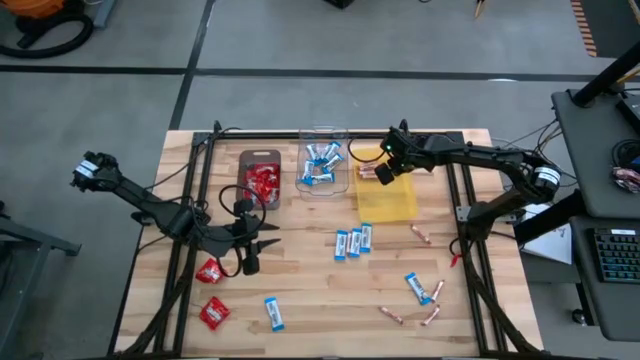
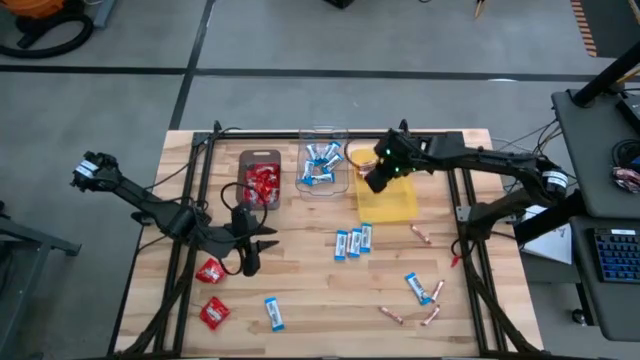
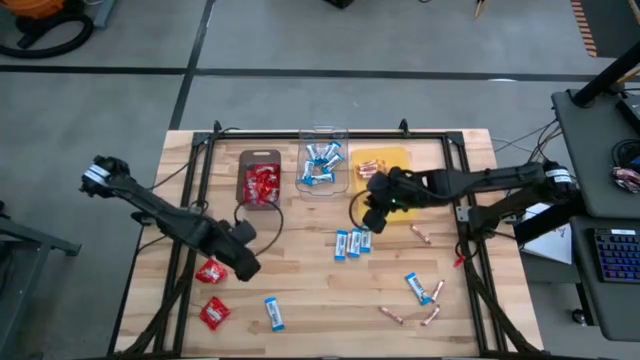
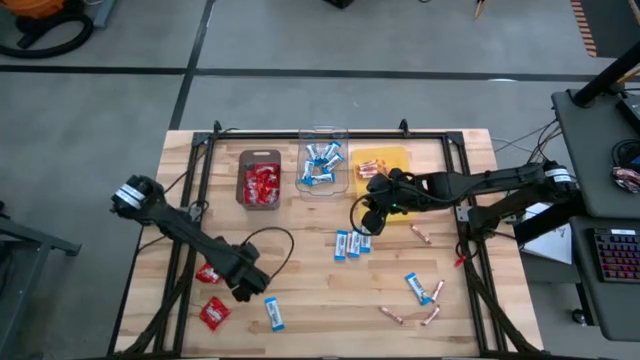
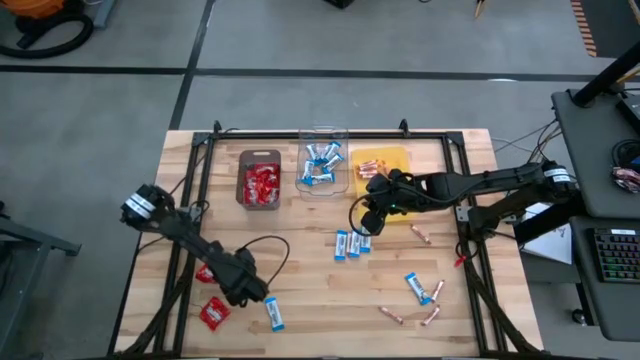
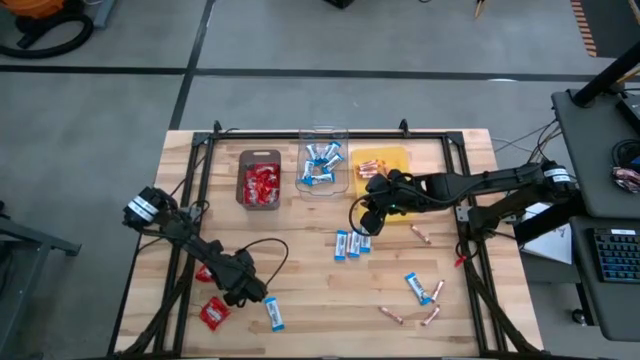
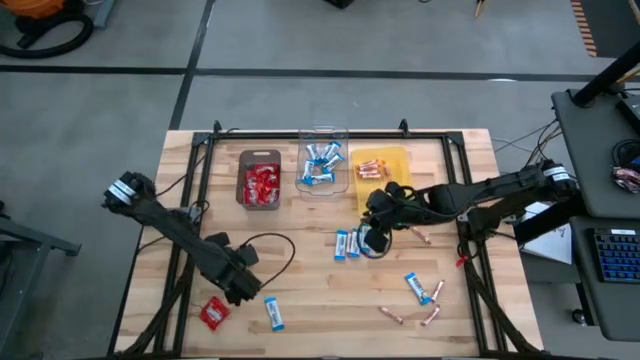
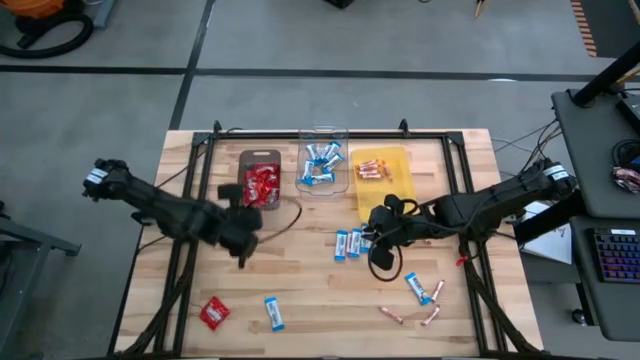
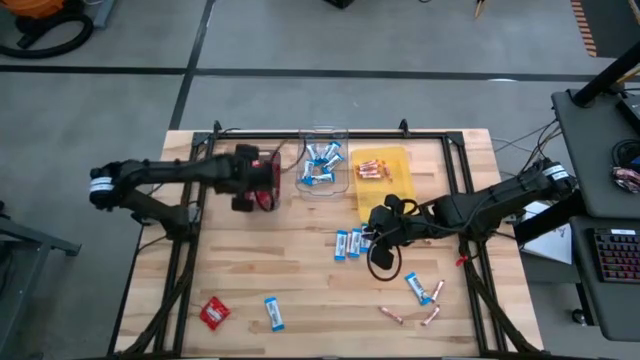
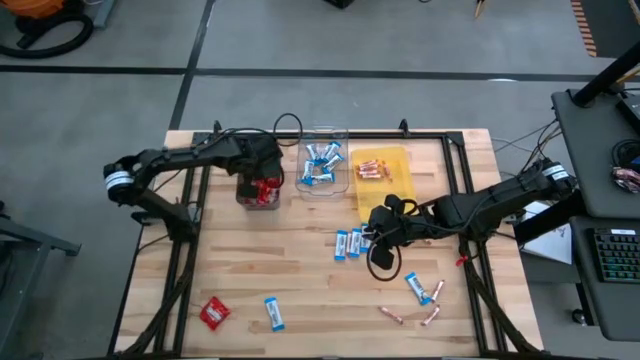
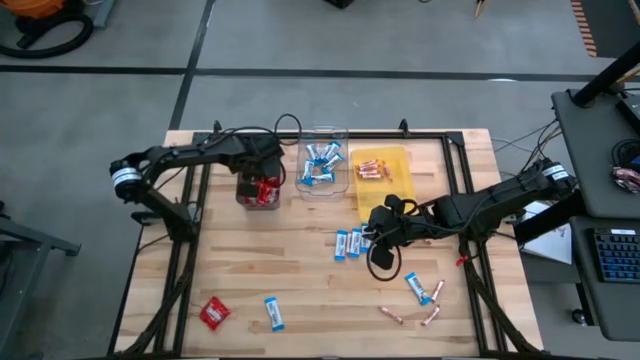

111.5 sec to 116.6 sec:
Task: Sort candy
Put the red candy into the black bin

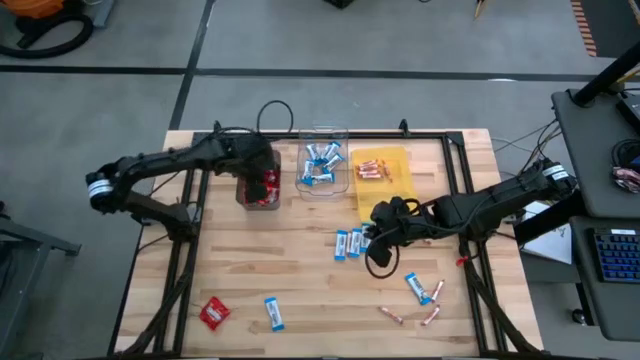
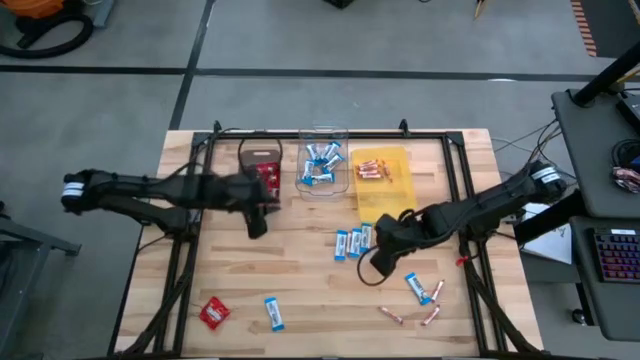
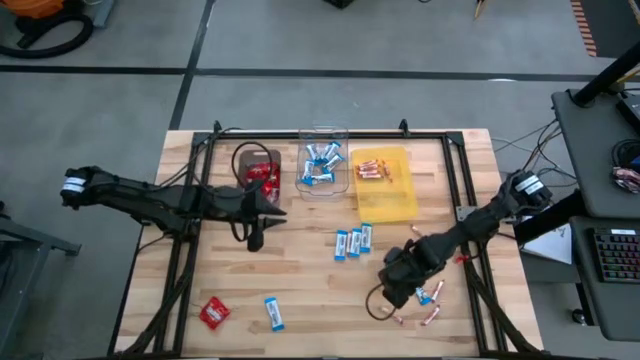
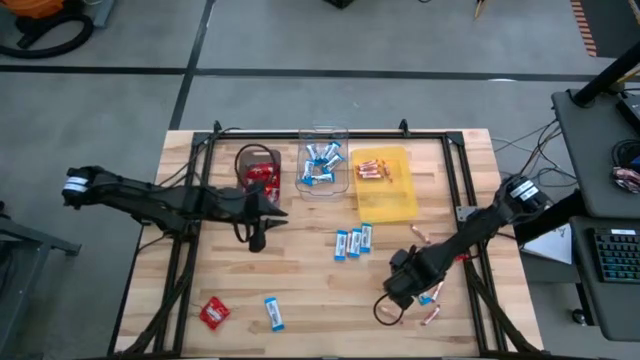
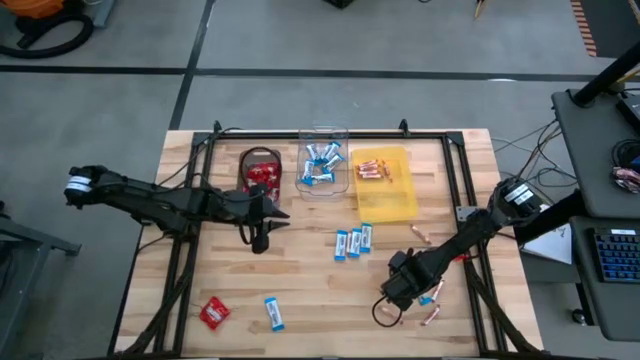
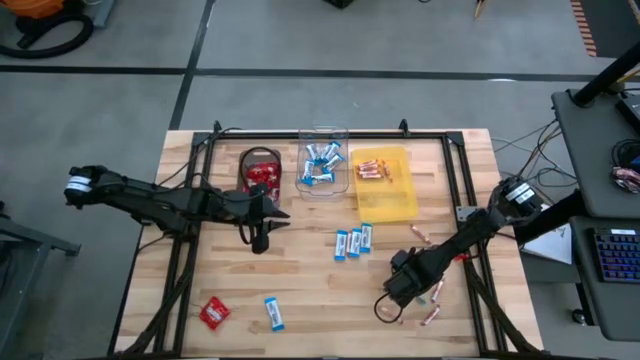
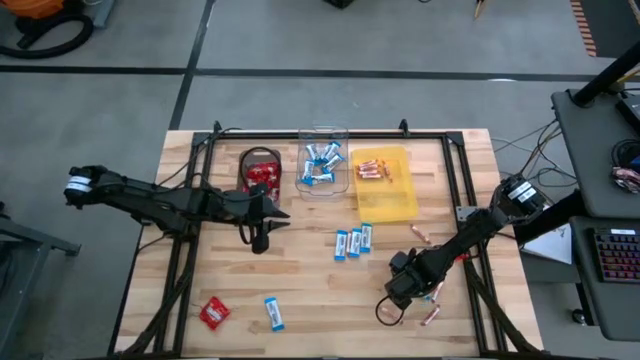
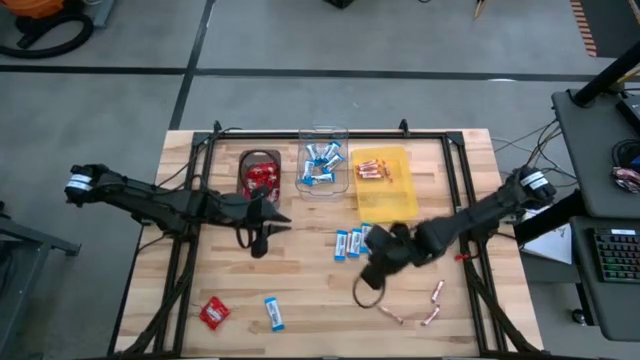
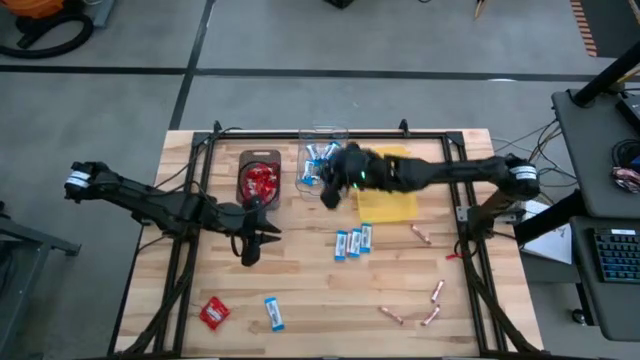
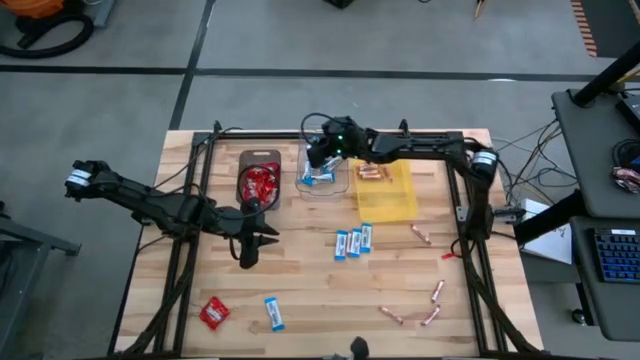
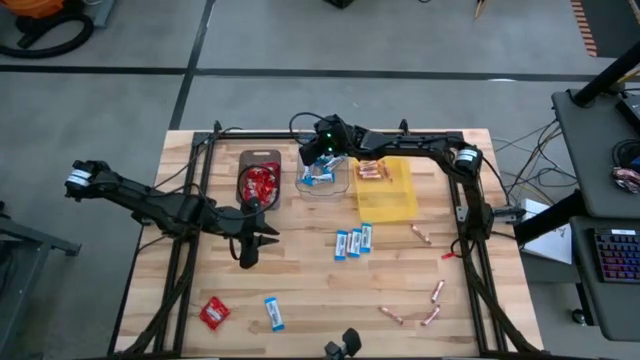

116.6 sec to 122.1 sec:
Put the white chocolate into the transparent bin

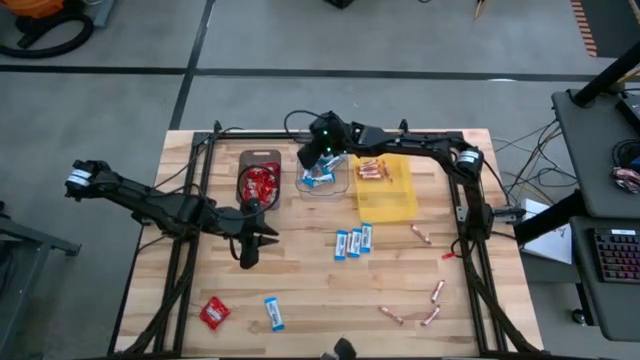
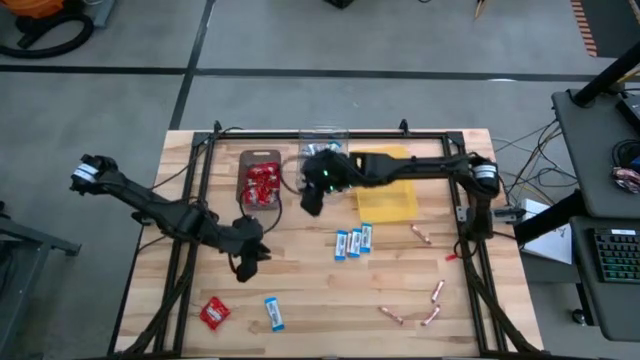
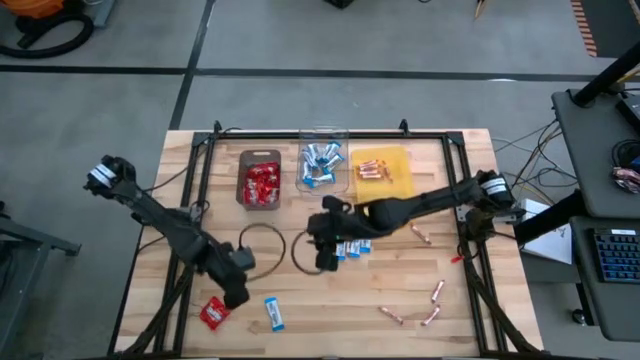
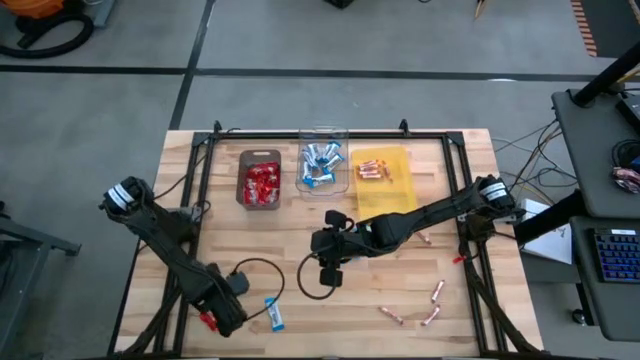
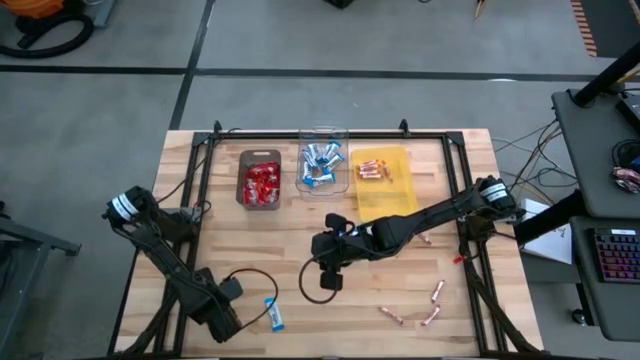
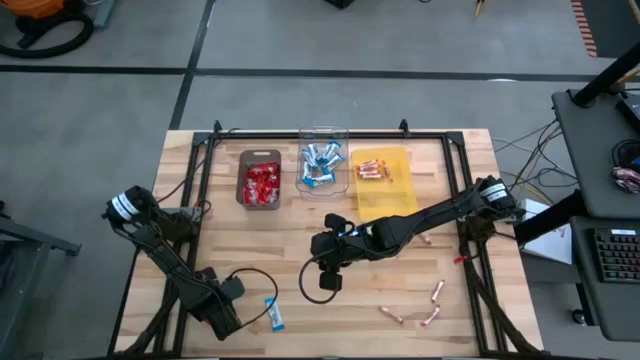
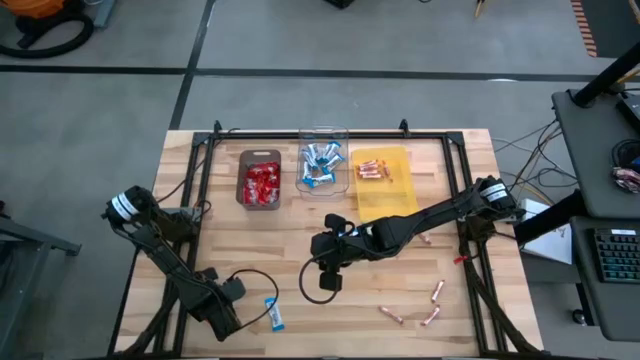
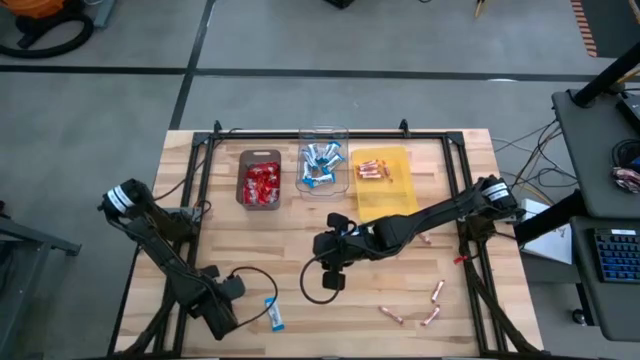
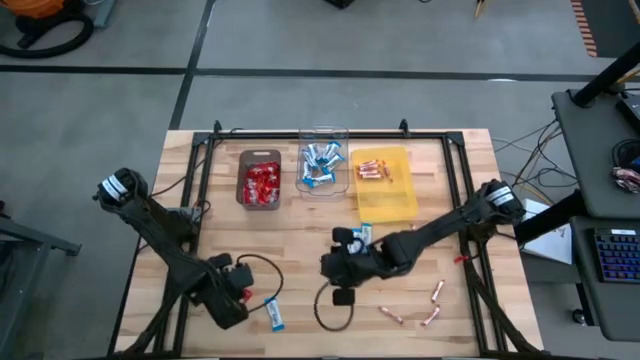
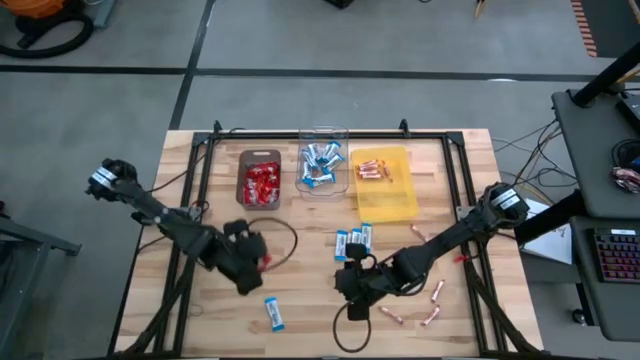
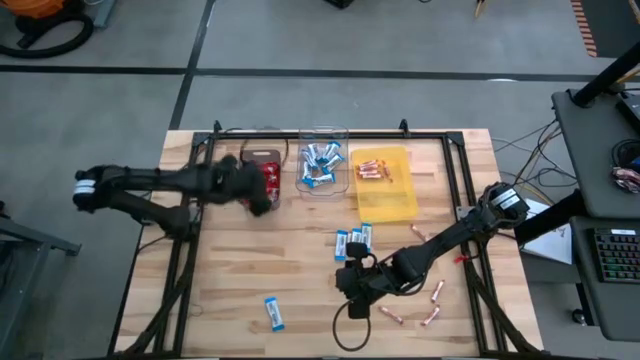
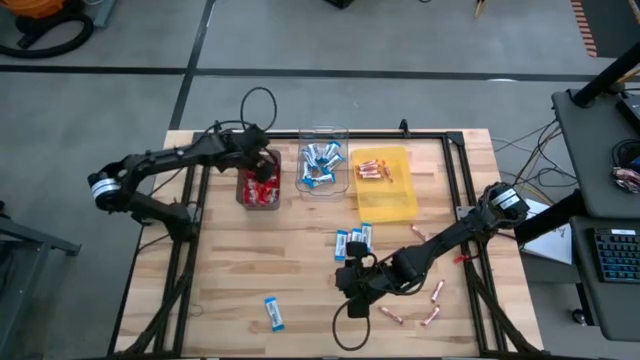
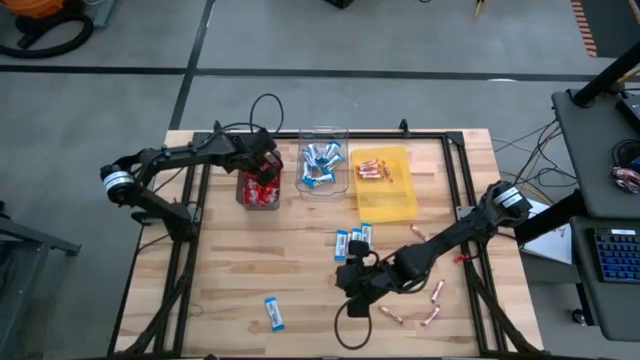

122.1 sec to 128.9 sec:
Put the red candy into the black bin

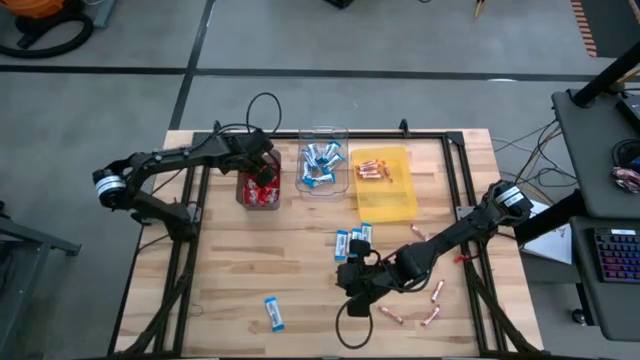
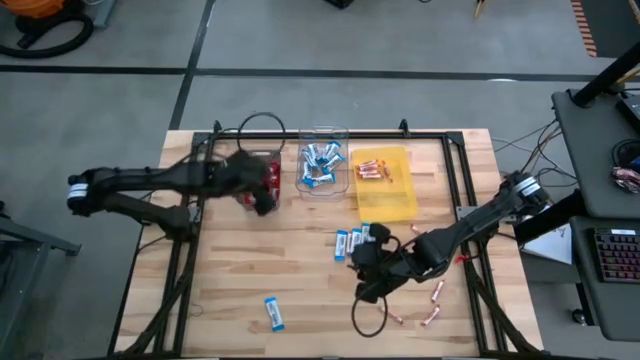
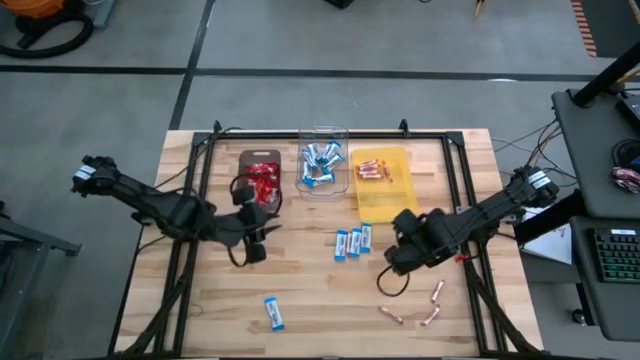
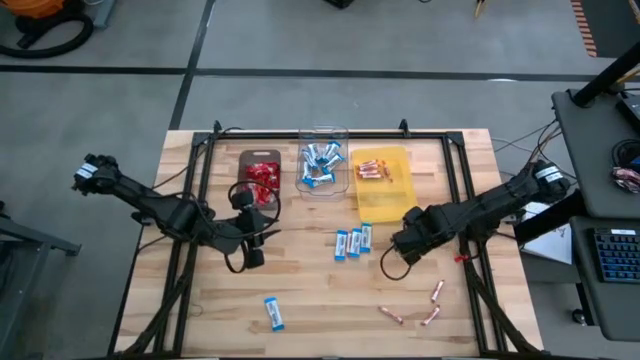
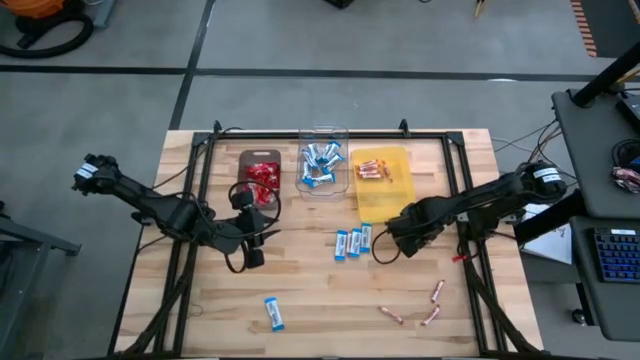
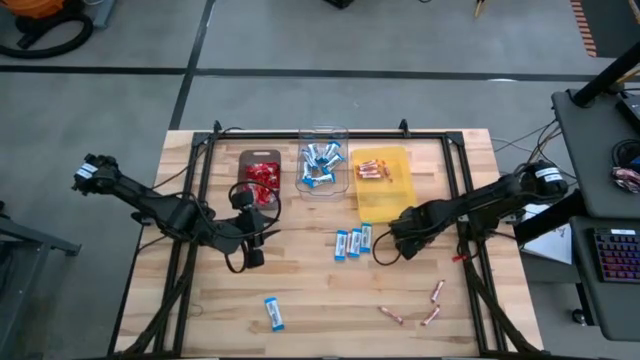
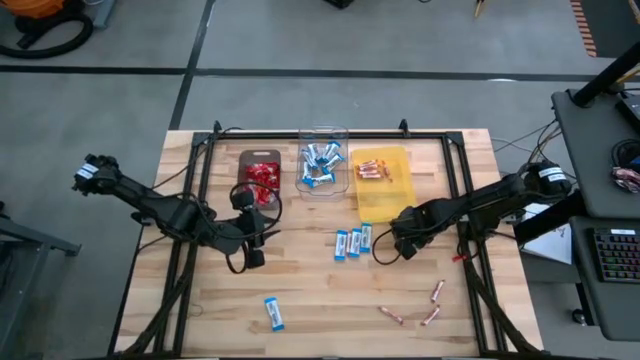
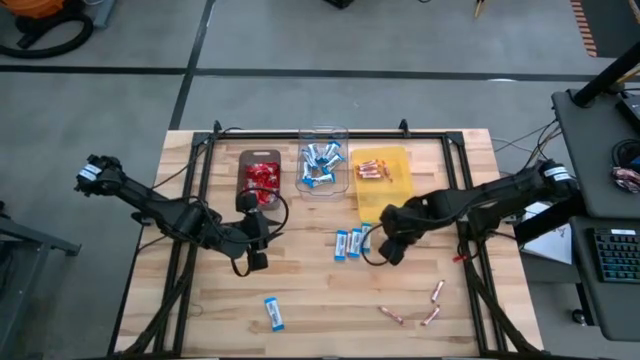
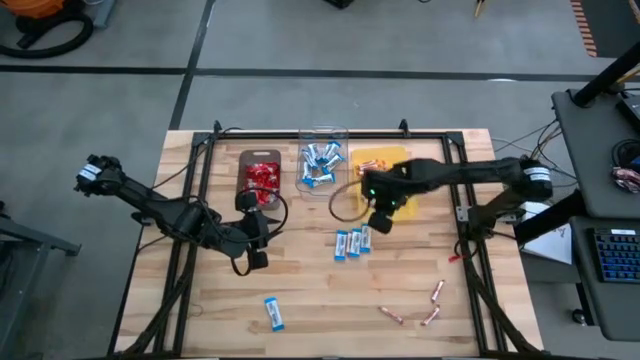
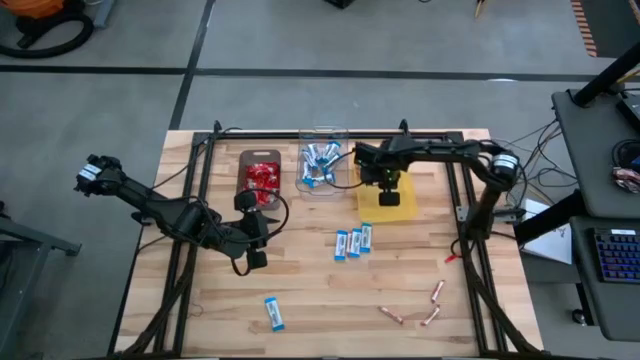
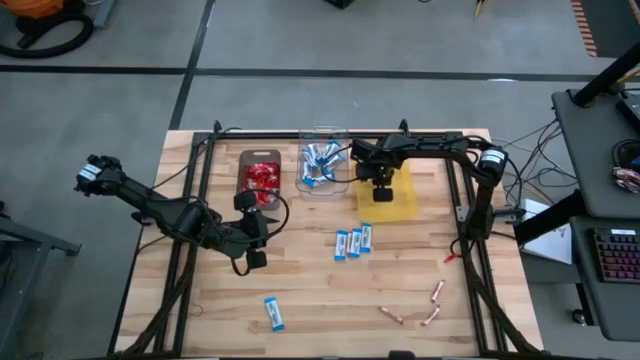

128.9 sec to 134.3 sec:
Put the white-red candy into the yellow bin
